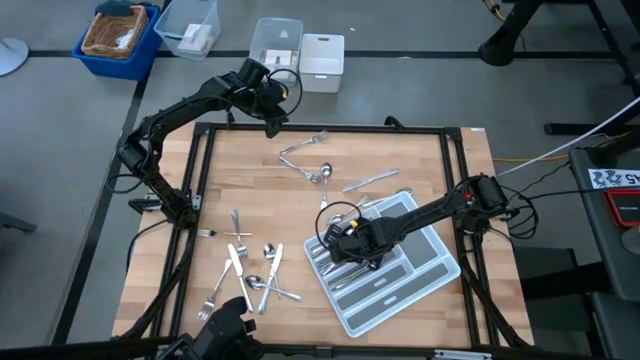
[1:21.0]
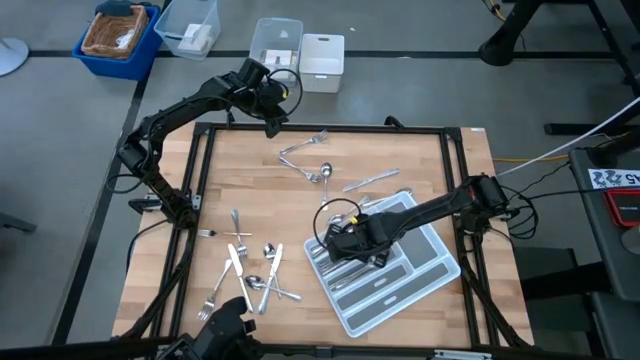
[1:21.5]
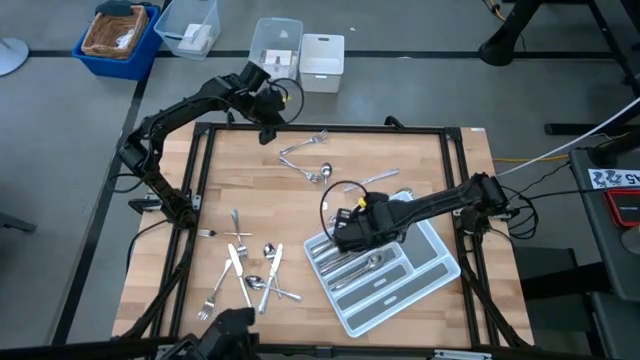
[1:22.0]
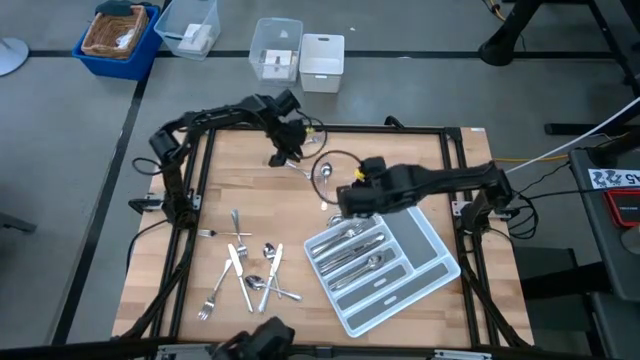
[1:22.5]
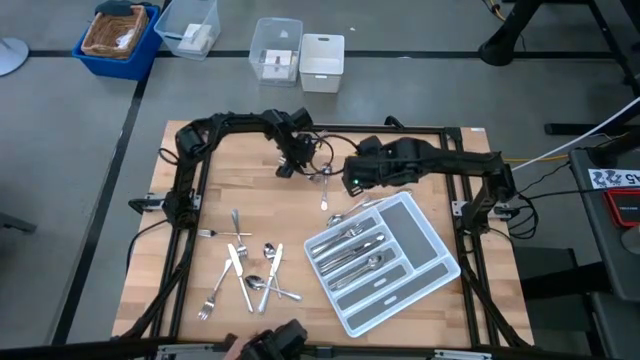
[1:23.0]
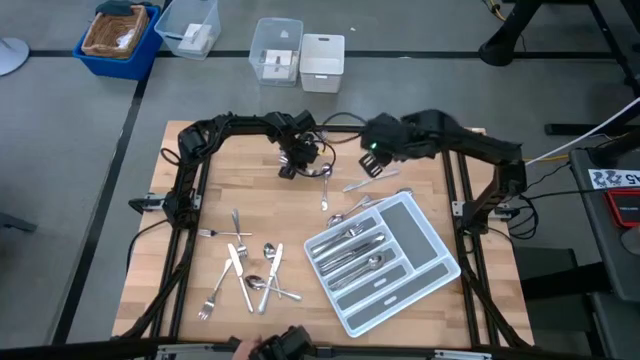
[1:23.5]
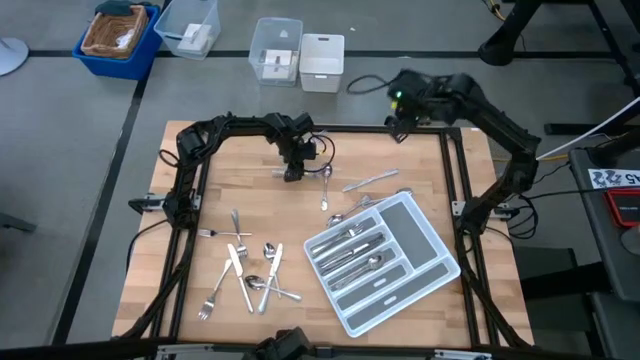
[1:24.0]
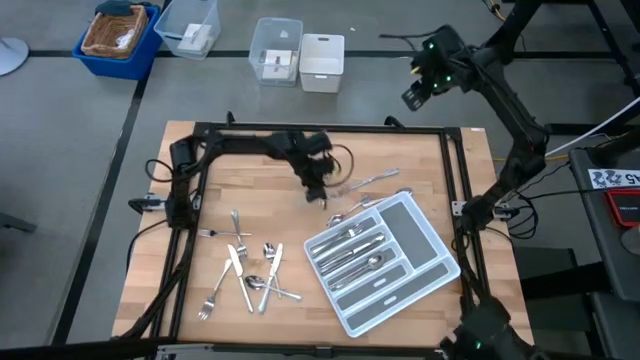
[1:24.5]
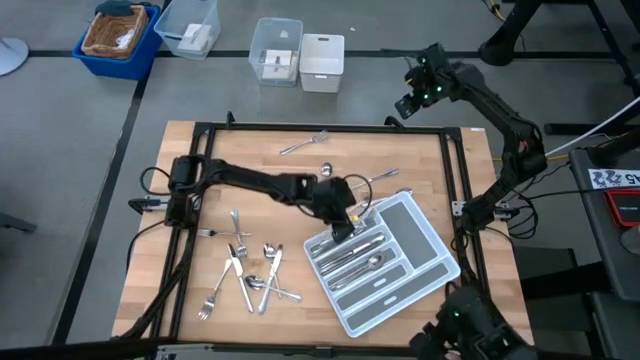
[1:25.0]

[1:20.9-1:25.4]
Task: Sort silverware
Put the silver fork into the silverware tray

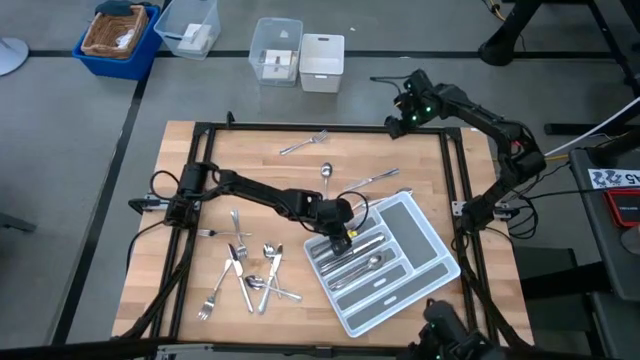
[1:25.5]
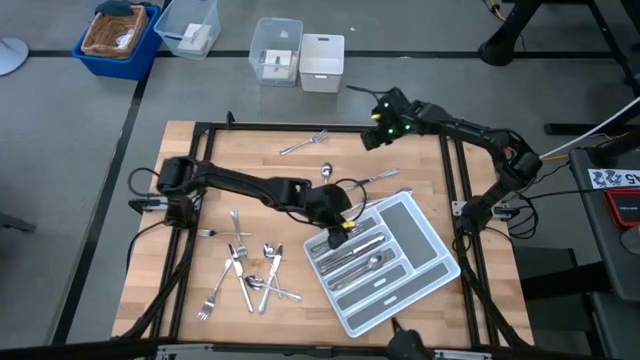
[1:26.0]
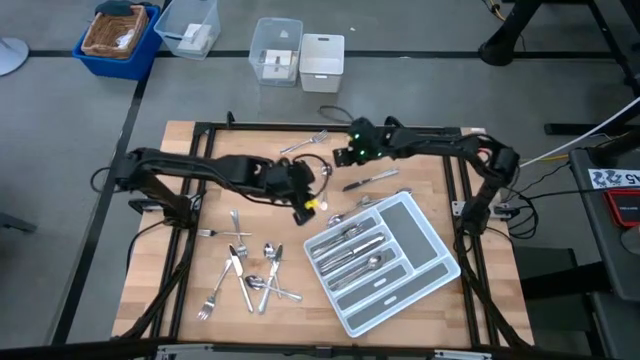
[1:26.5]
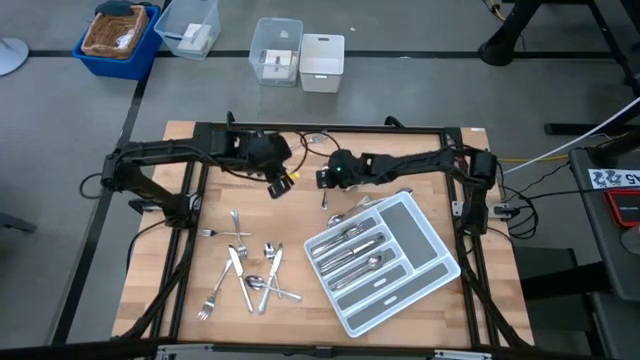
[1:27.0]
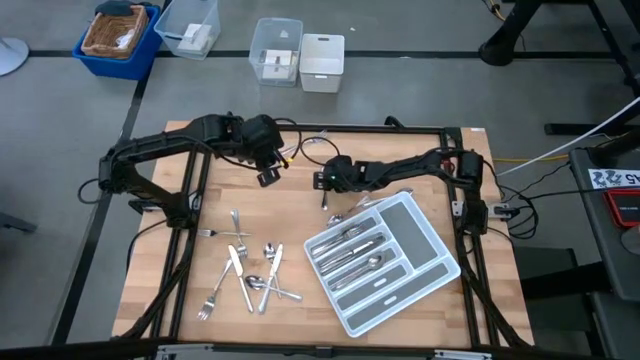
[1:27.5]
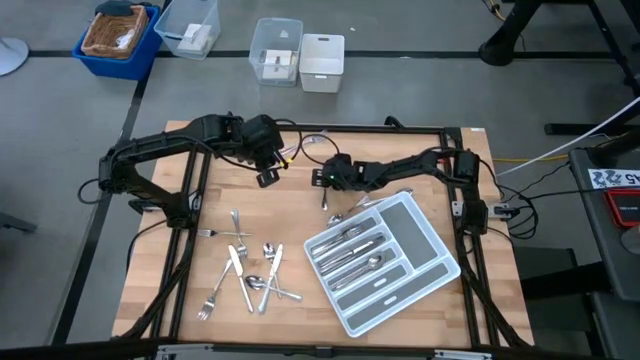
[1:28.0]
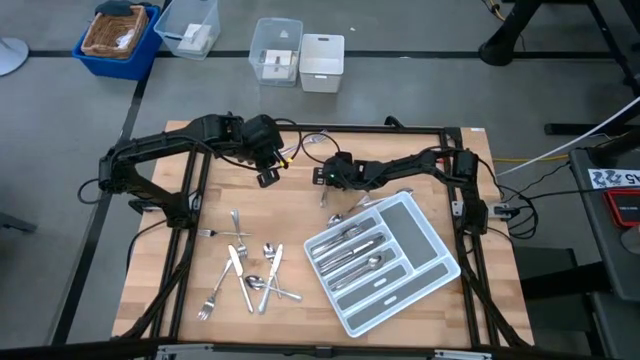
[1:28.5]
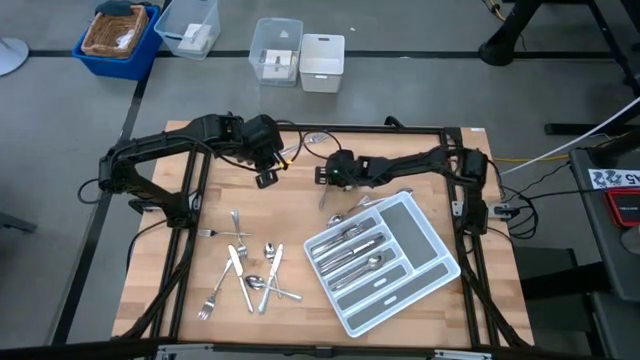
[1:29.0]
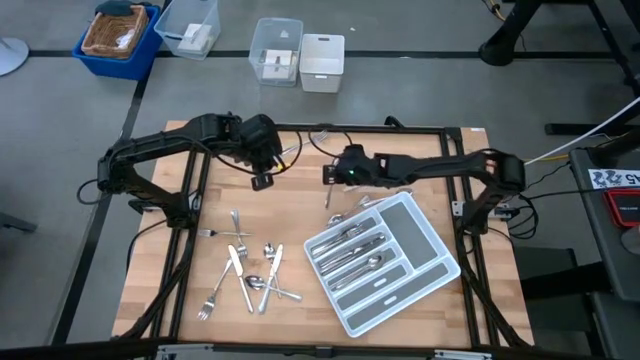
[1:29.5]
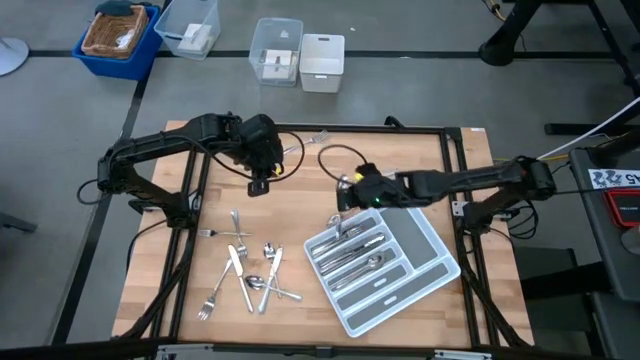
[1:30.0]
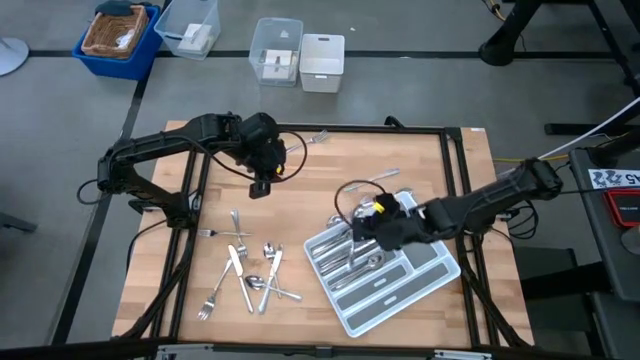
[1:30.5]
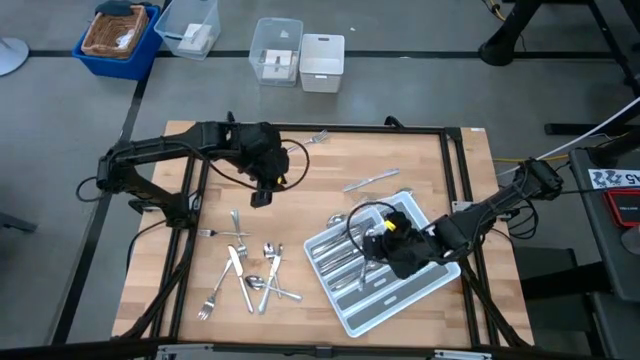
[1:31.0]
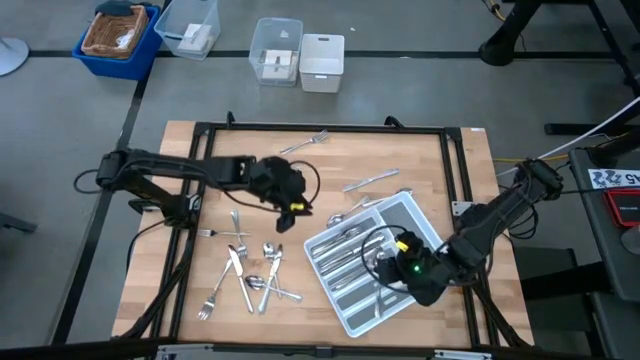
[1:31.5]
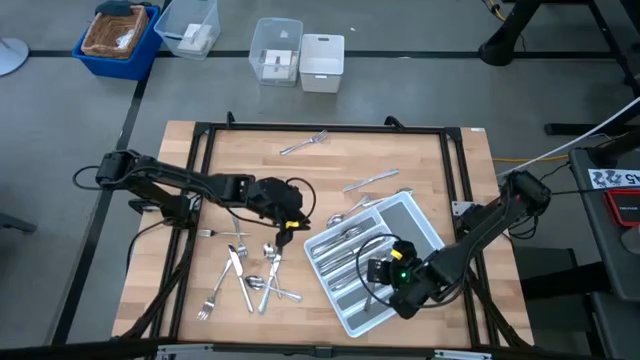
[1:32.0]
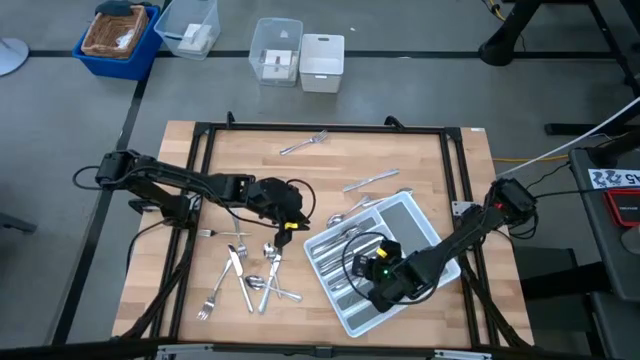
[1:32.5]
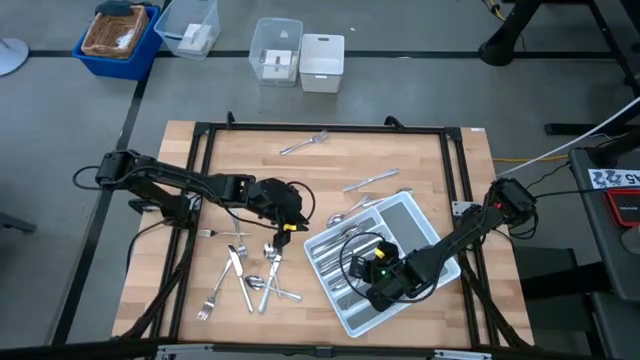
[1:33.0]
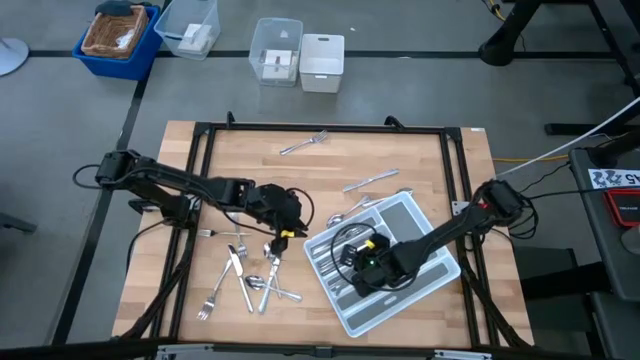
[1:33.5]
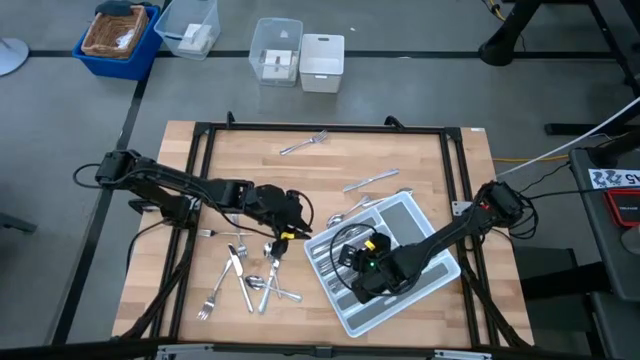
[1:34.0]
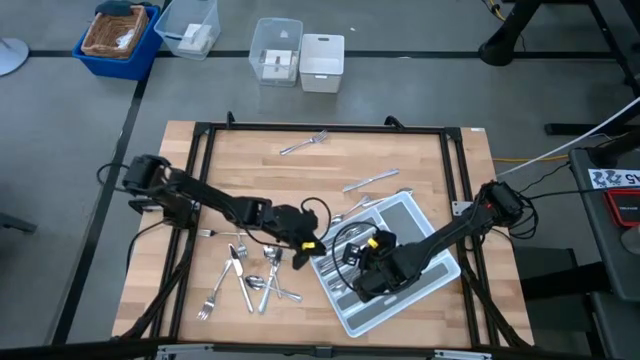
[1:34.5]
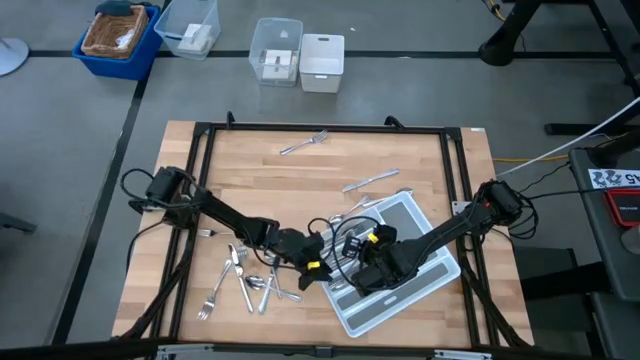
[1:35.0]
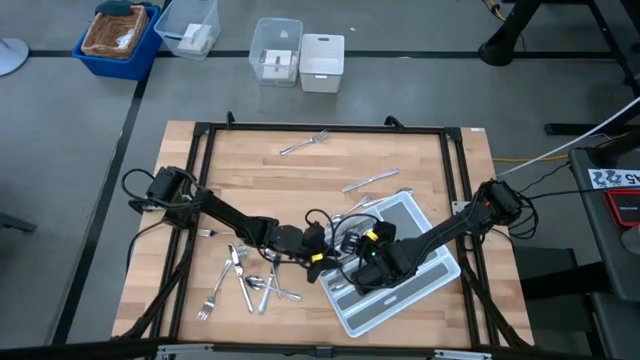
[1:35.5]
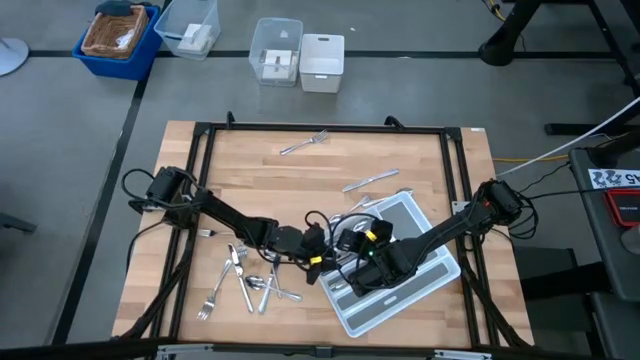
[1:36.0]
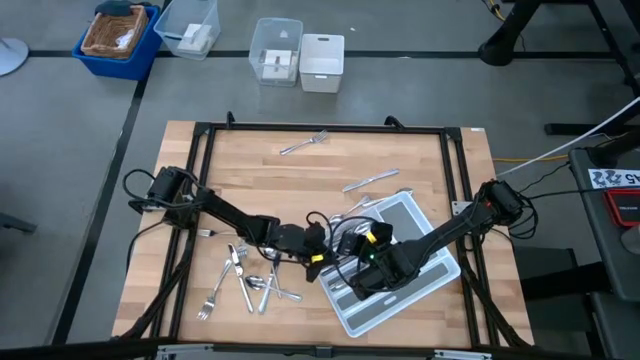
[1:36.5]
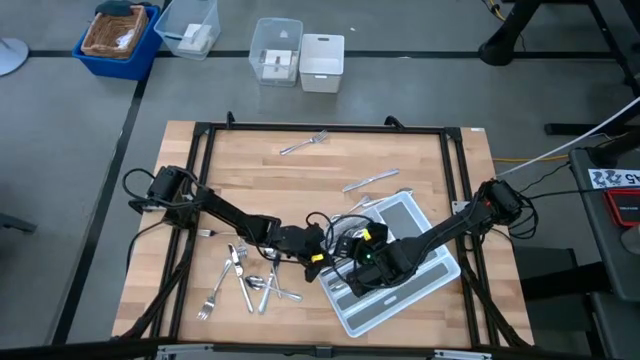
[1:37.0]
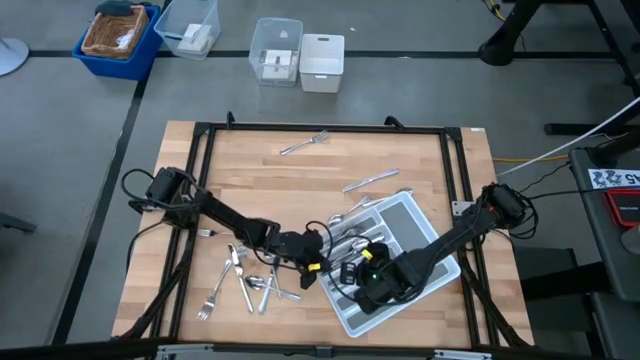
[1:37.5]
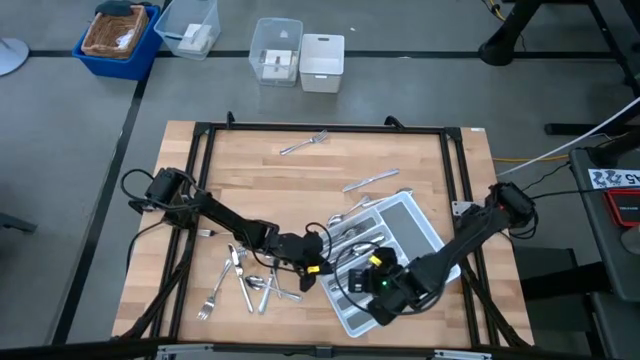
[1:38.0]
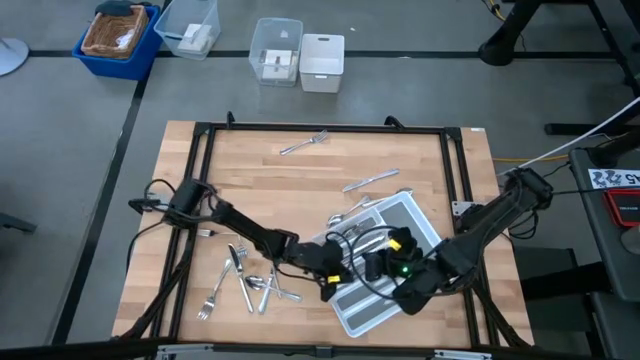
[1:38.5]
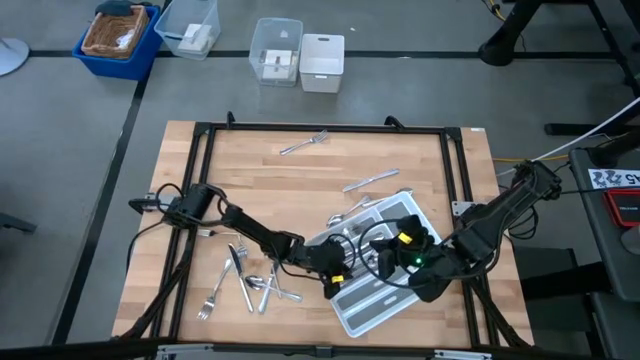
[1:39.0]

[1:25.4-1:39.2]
Put the silver spoon into the silverware tray

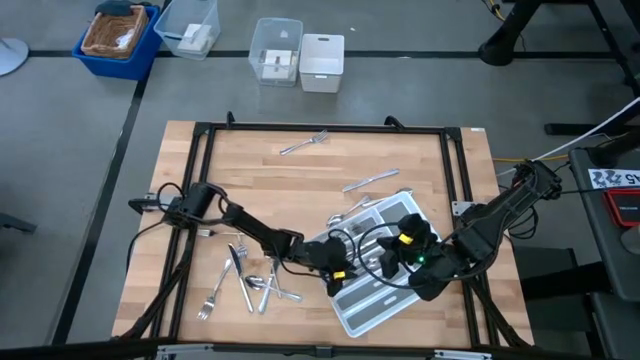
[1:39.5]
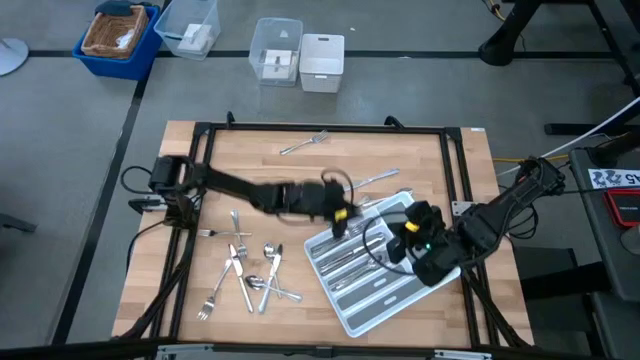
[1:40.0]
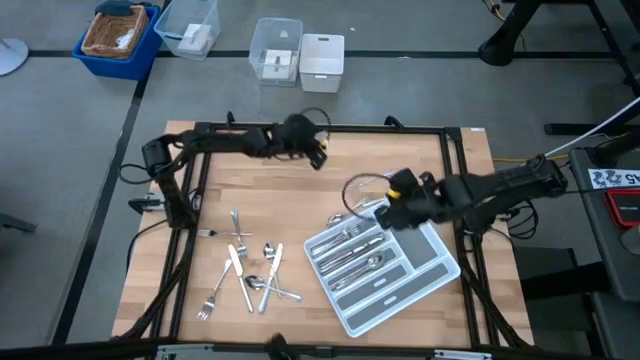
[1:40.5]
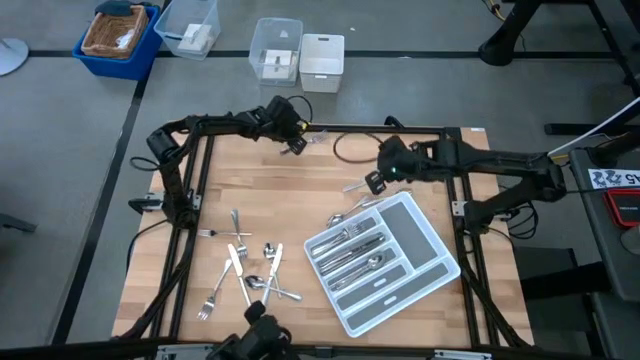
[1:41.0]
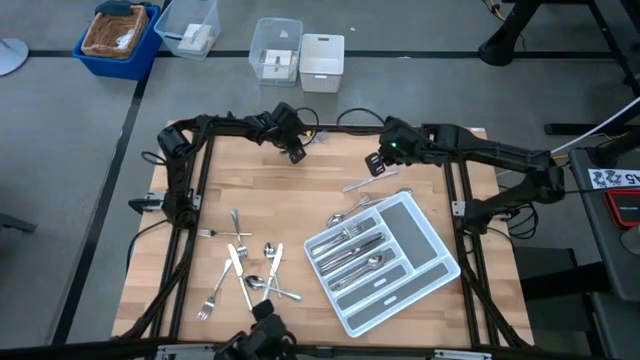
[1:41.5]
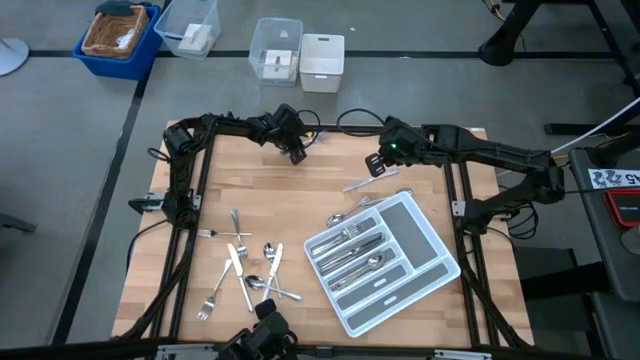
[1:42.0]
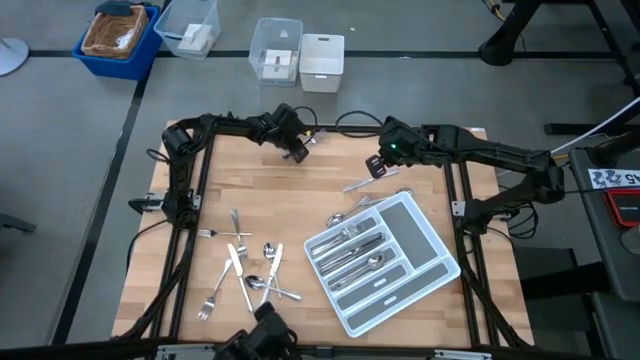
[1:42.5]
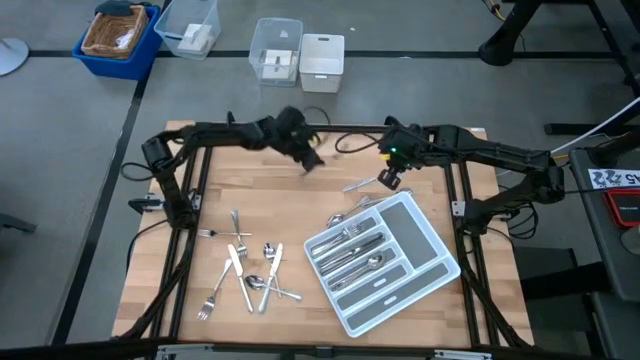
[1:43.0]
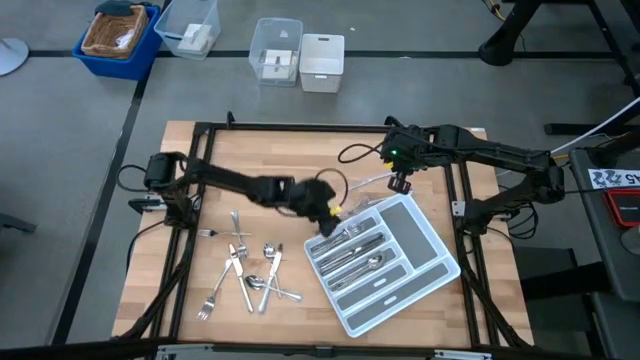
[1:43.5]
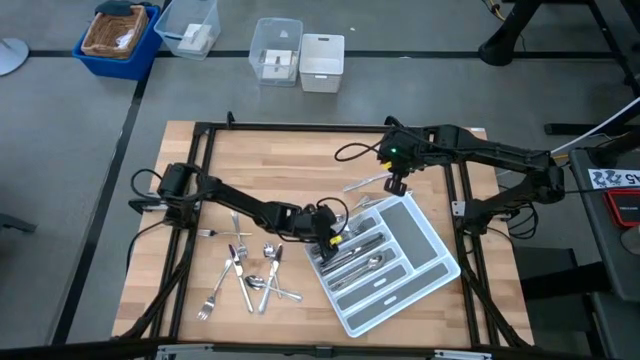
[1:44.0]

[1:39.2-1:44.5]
Put the silver fork into the silverware tray
